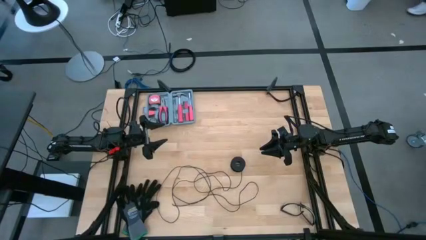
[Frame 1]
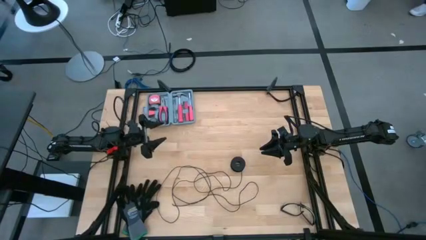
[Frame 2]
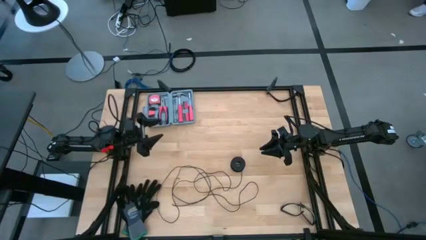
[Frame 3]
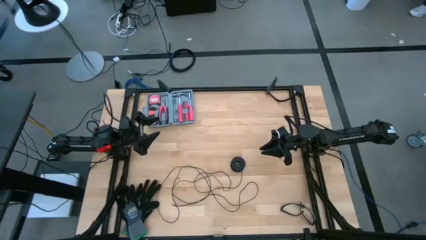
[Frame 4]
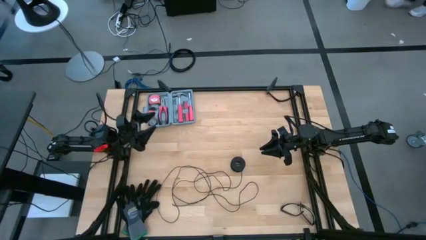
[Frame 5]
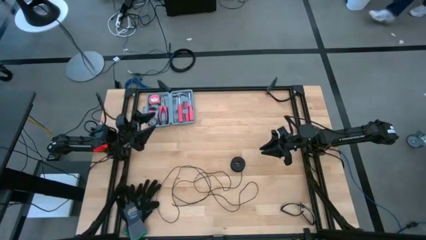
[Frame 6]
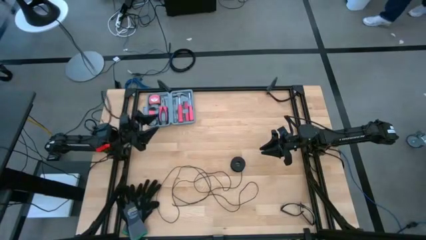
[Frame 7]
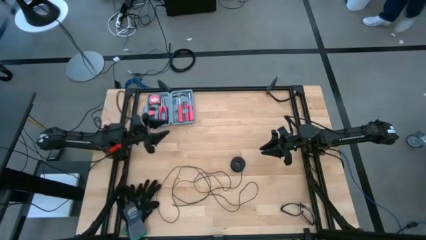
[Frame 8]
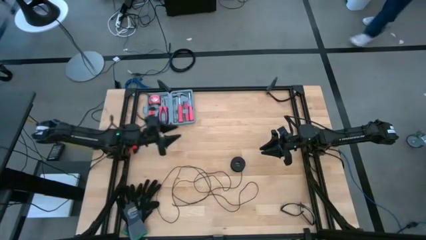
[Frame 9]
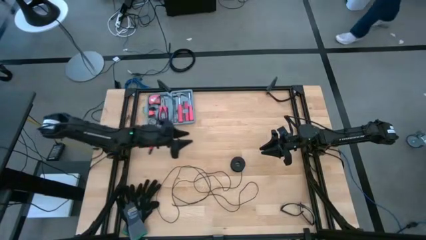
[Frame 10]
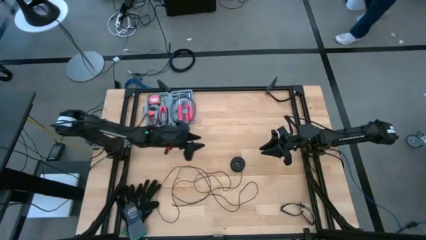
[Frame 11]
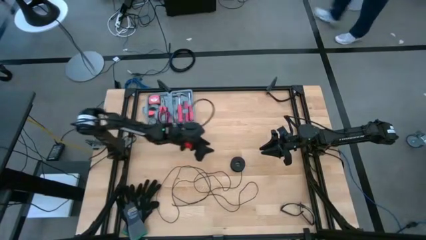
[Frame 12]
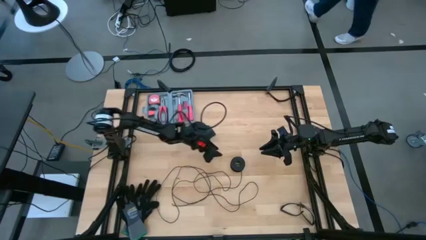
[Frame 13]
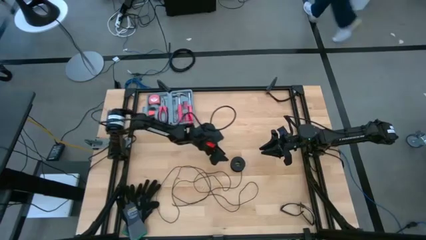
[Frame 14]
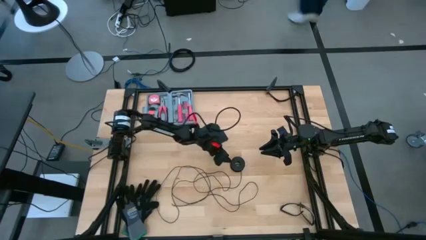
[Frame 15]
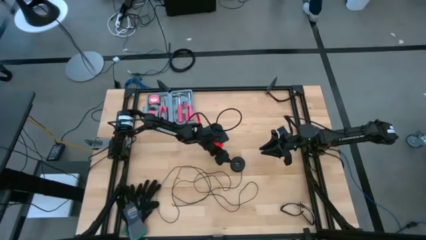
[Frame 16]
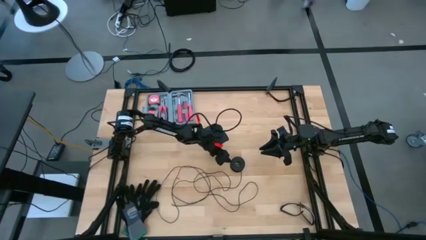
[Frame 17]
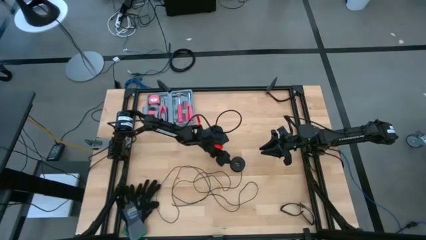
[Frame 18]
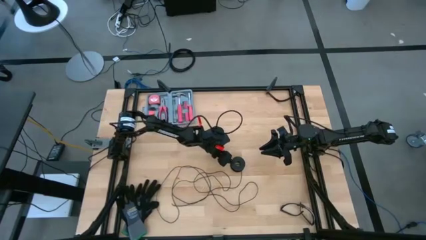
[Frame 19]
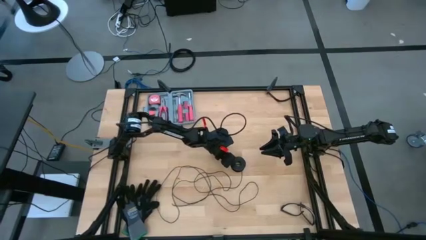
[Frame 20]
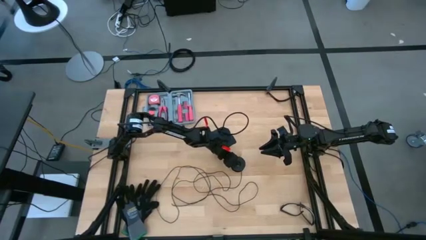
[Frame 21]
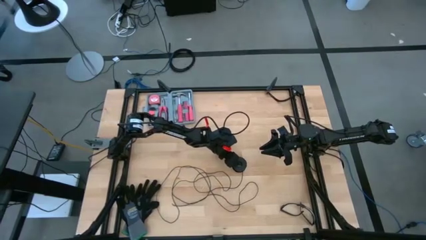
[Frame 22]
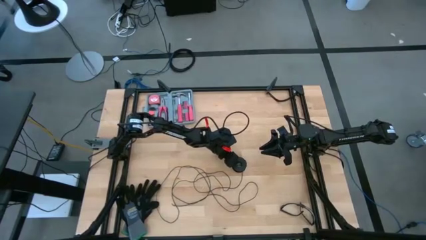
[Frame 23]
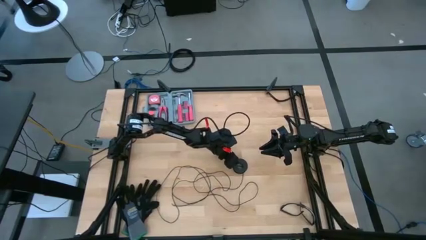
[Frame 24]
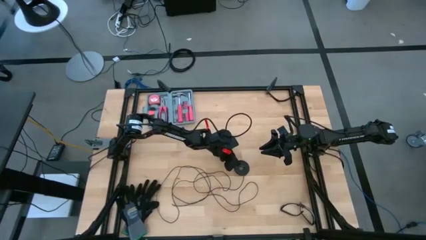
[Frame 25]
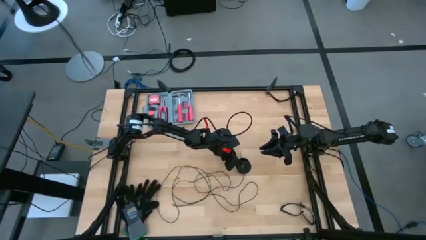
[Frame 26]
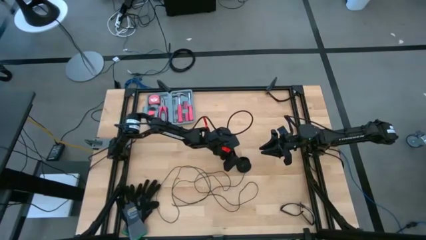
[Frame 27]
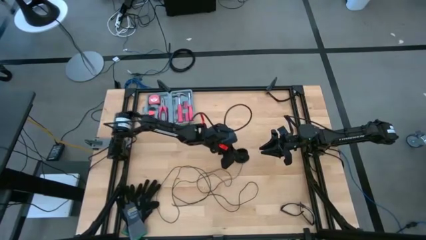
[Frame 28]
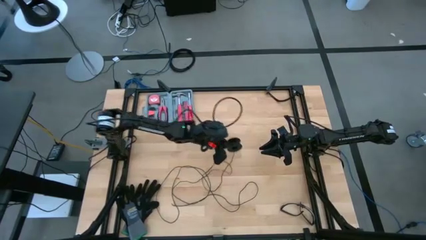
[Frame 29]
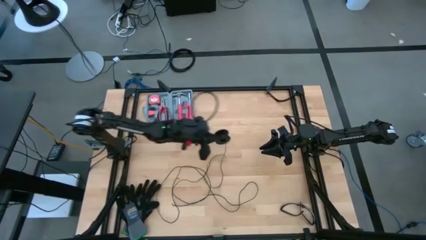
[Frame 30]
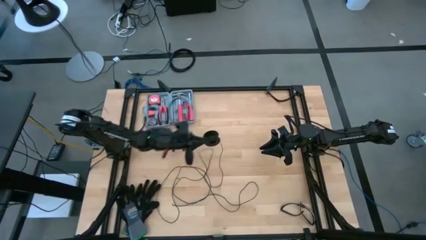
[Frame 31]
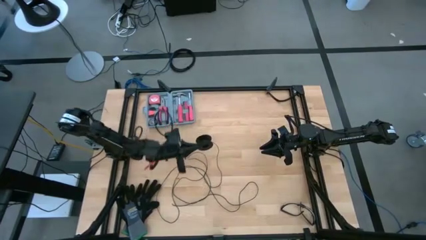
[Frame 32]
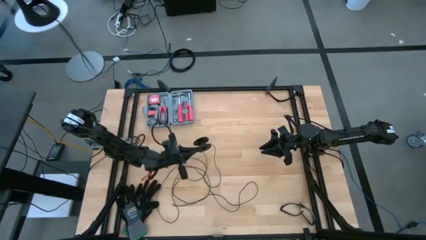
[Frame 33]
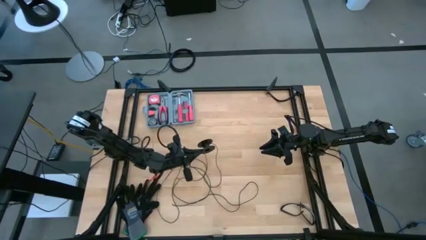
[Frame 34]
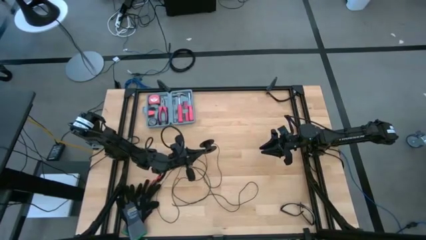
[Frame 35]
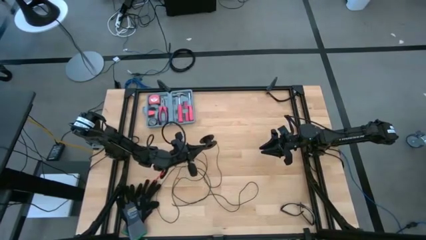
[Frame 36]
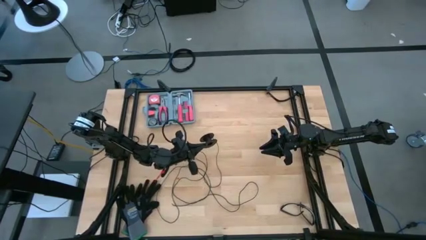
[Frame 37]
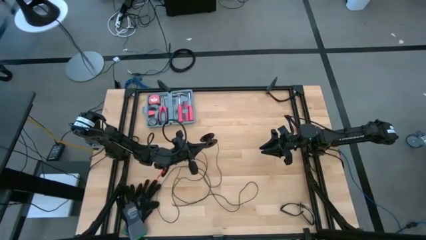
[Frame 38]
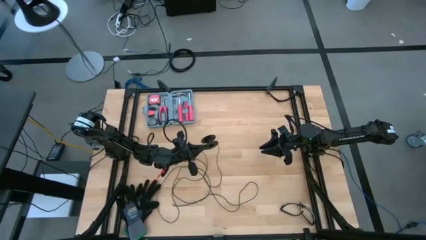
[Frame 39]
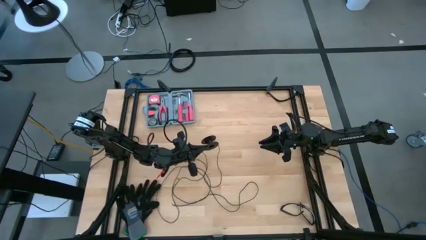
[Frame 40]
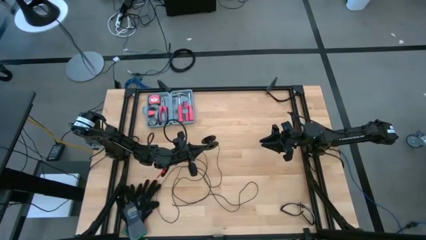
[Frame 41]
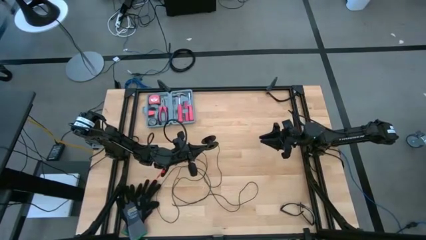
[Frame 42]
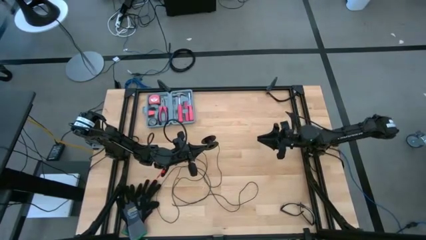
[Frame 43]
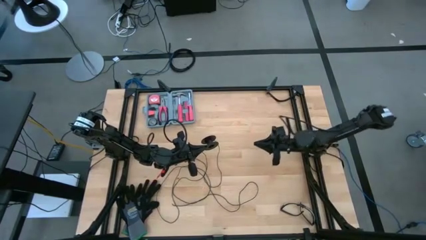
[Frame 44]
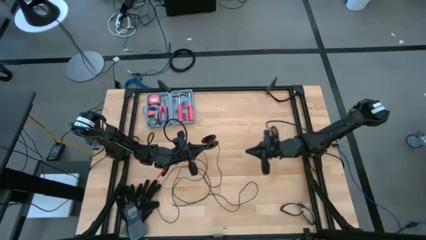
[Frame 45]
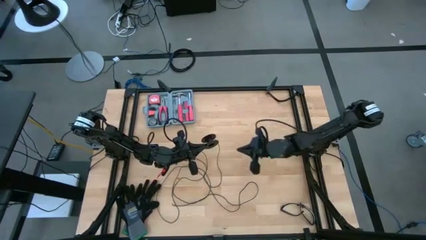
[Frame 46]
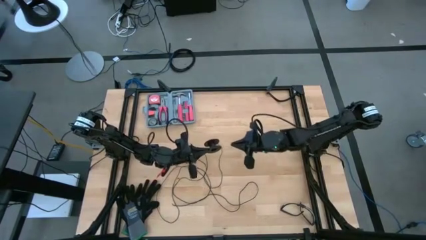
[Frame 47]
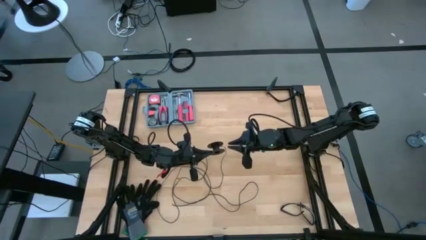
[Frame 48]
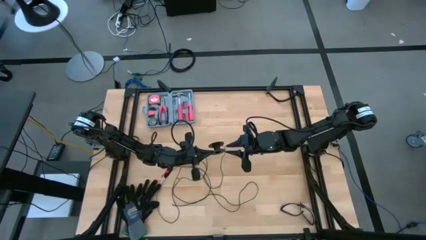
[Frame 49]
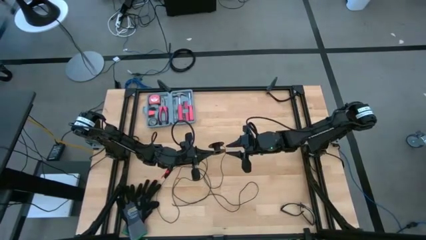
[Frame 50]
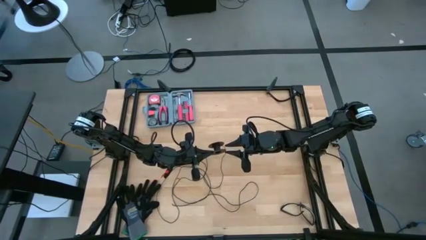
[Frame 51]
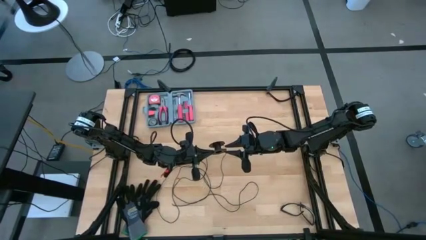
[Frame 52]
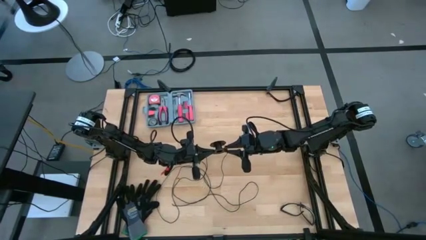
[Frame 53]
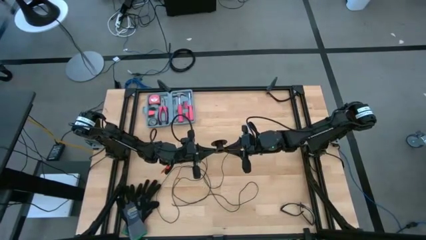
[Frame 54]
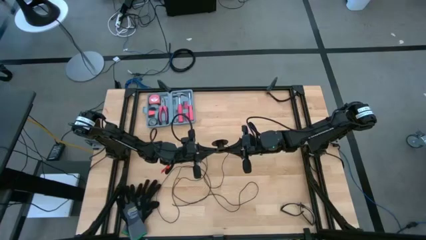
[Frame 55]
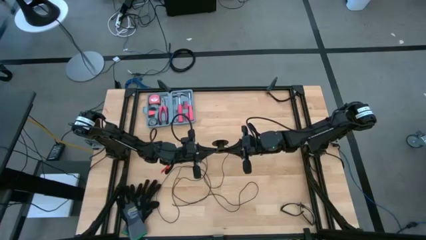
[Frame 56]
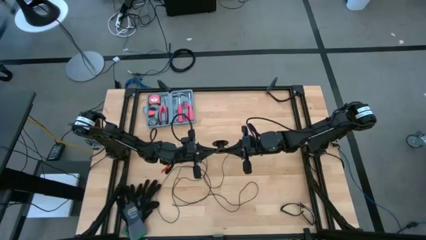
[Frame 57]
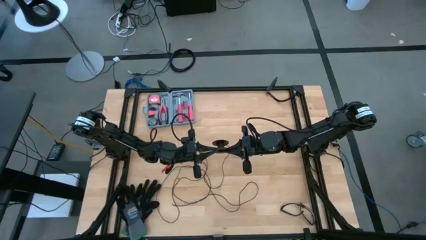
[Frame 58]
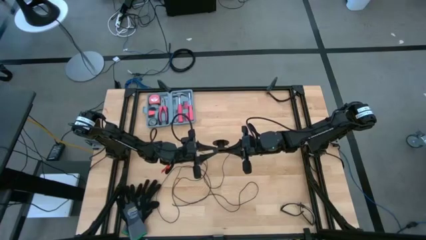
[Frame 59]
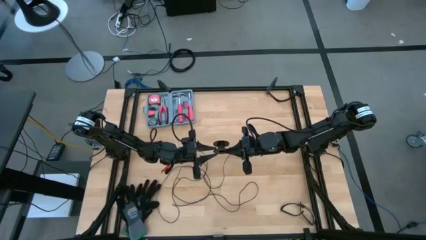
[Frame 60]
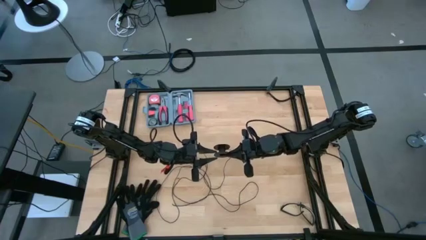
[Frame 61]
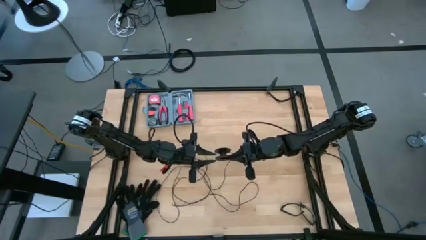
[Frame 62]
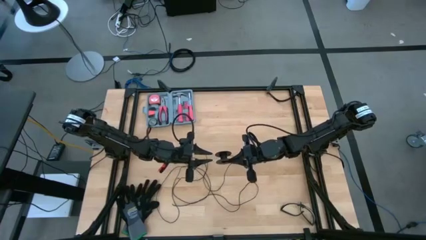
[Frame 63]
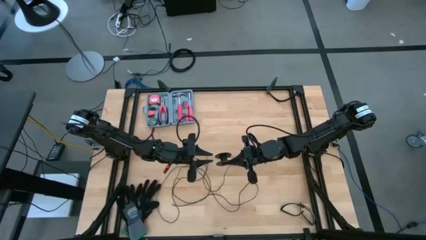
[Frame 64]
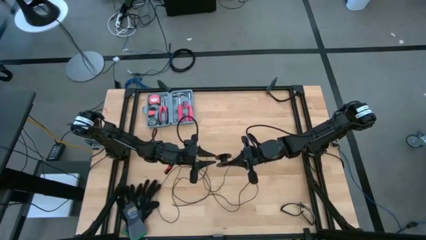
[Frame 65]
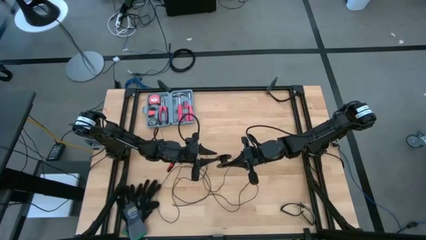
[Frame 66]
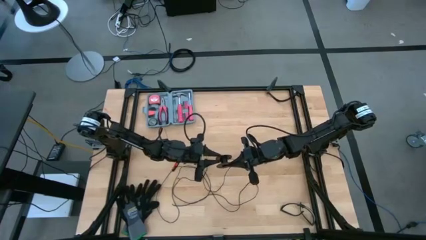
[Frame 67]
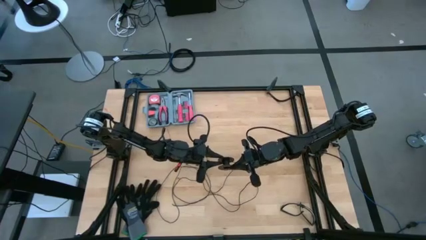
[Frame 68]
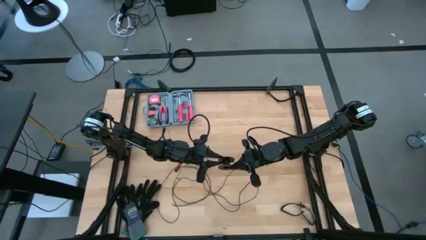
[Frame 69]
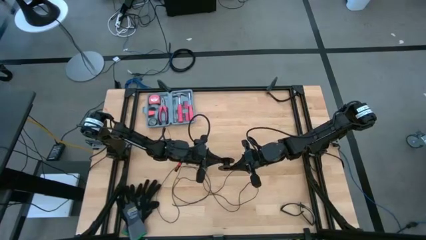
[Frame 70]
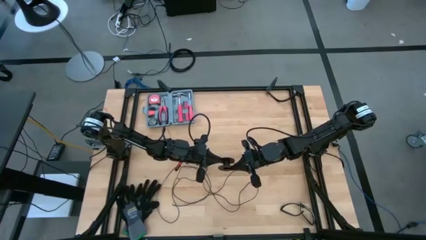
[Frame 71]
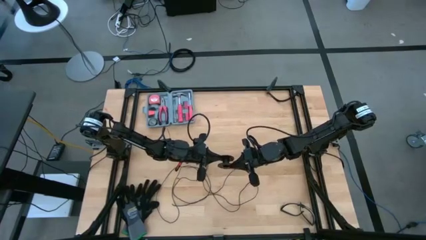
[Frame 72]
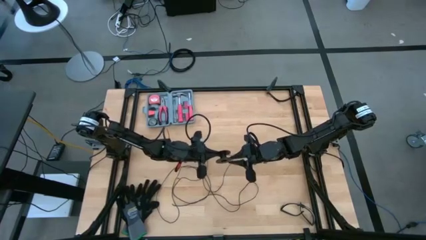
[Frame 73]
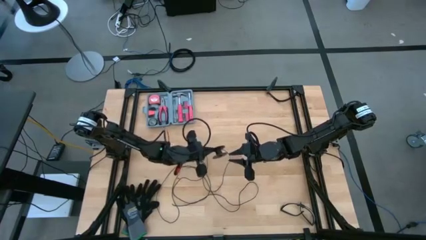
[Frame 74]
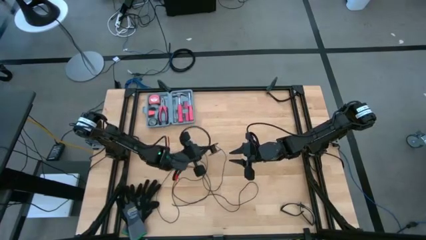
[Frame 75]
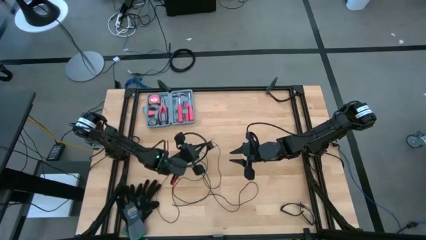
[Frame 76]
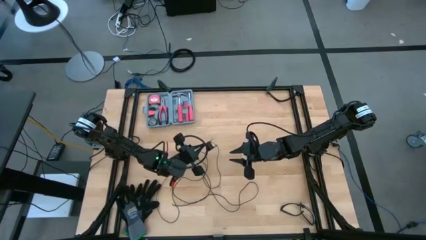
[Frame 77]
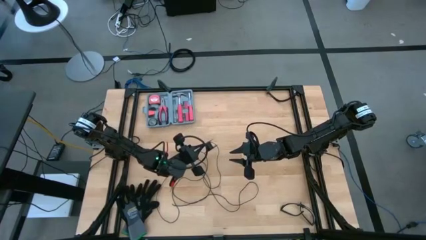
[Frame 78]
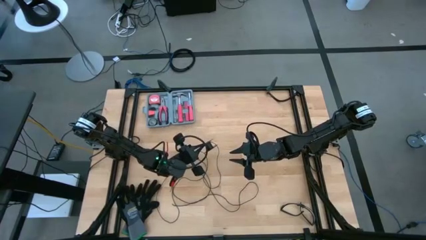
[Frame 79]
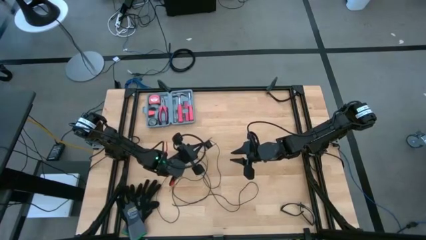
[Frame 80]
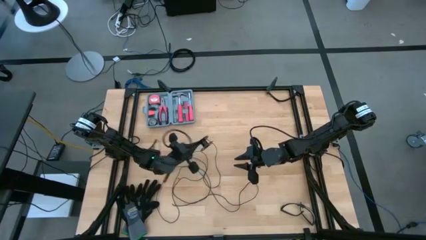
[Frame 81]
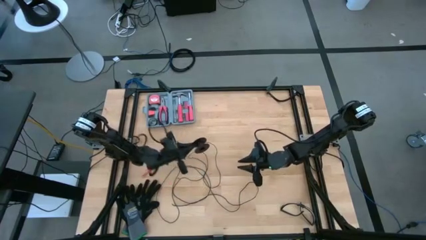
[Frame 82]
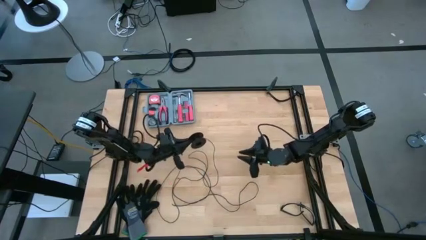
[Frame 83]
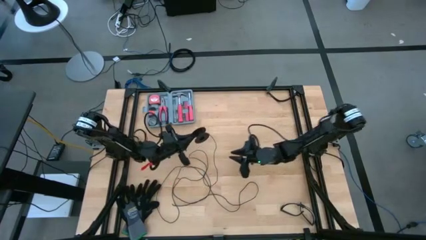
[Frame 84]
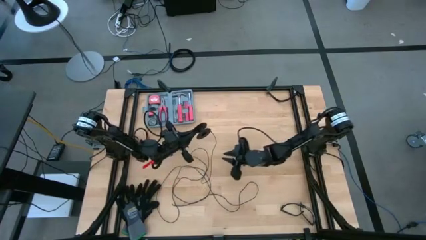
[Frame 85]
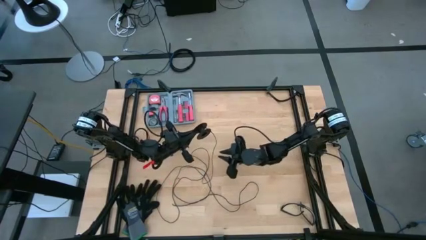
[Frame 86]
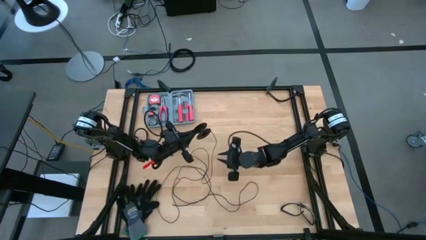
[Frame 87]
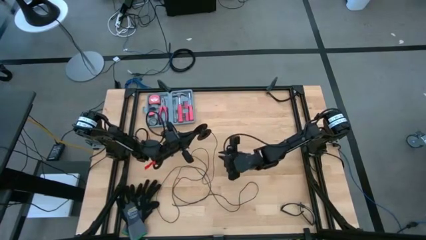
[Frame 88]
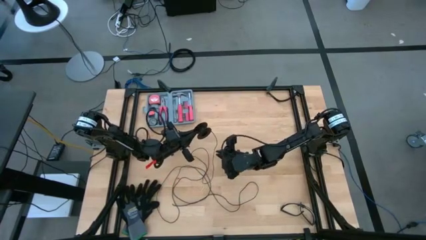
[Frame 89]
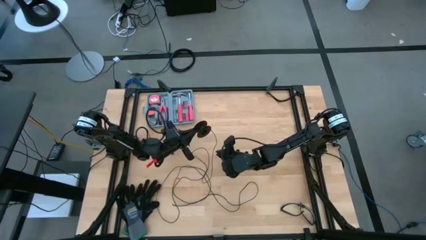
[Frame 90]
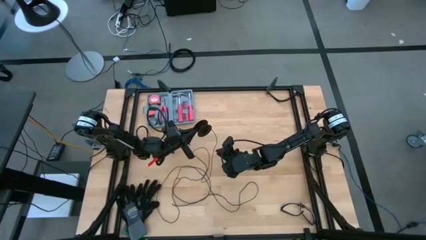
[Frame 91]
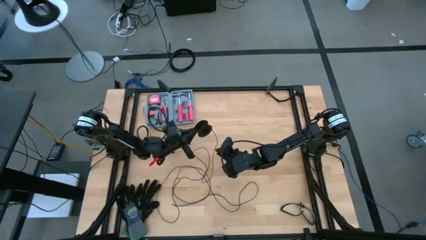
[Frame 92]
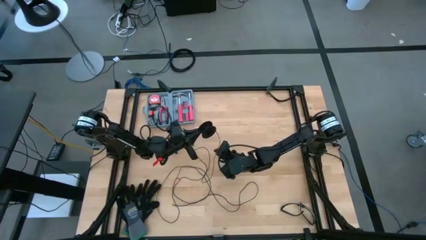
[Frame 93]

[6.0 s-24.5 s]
Task: Coil cords
Coil the black wire onto the spool
